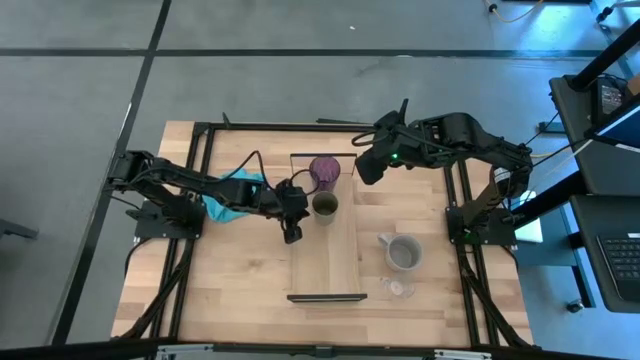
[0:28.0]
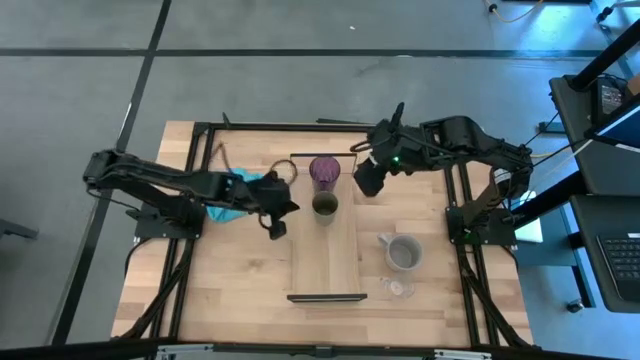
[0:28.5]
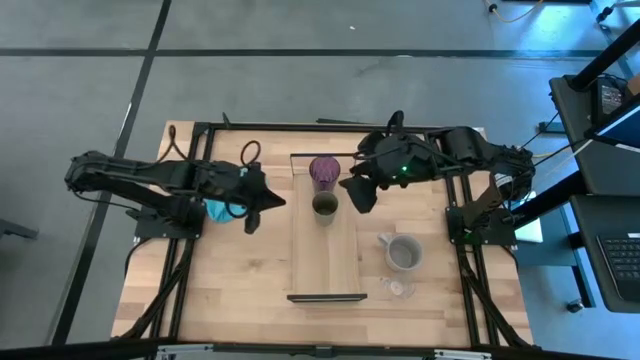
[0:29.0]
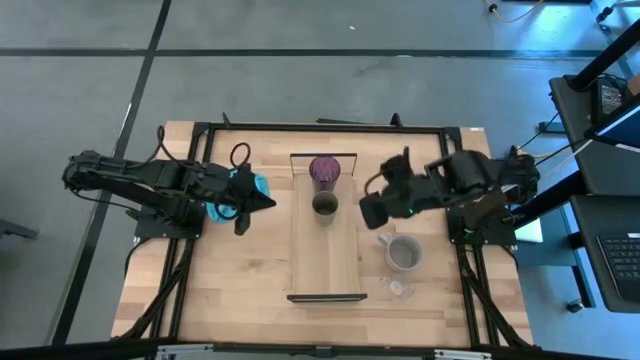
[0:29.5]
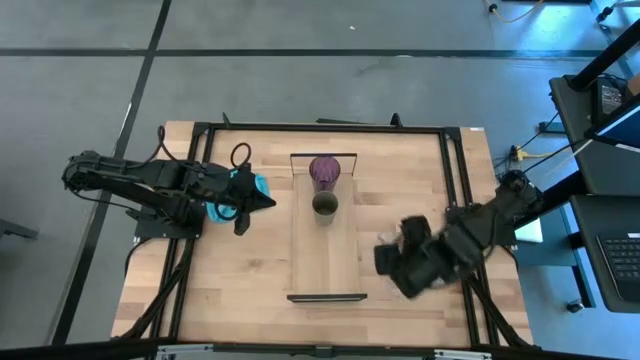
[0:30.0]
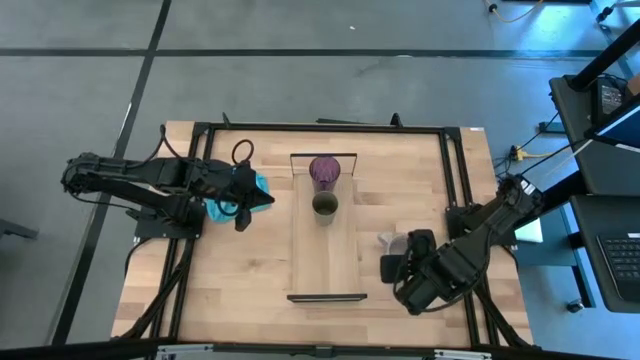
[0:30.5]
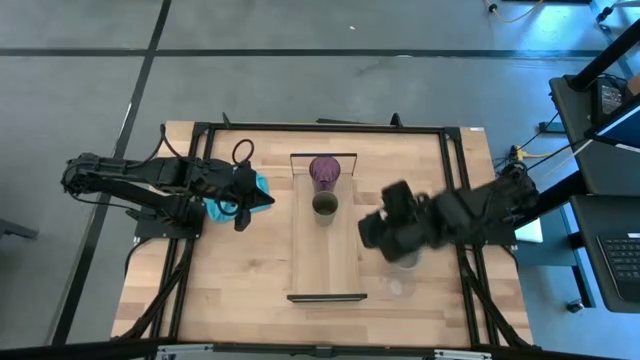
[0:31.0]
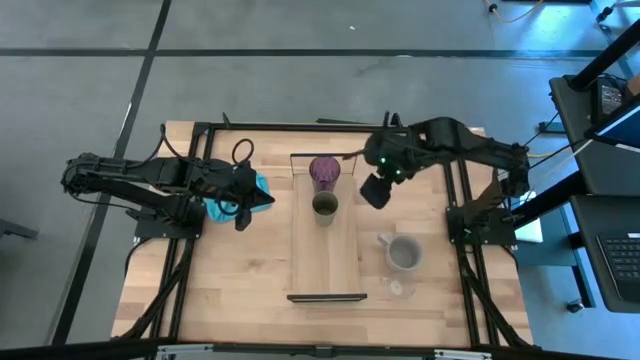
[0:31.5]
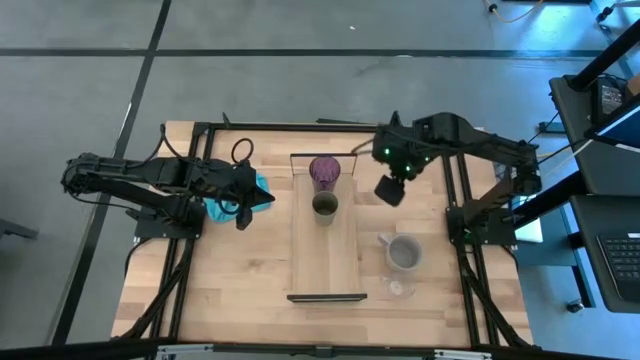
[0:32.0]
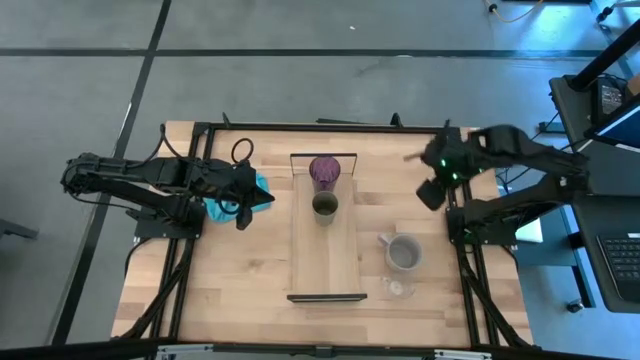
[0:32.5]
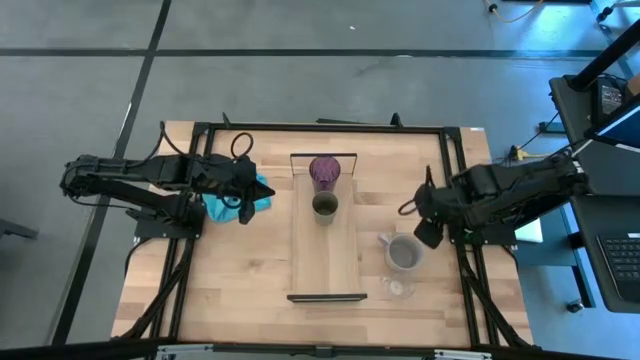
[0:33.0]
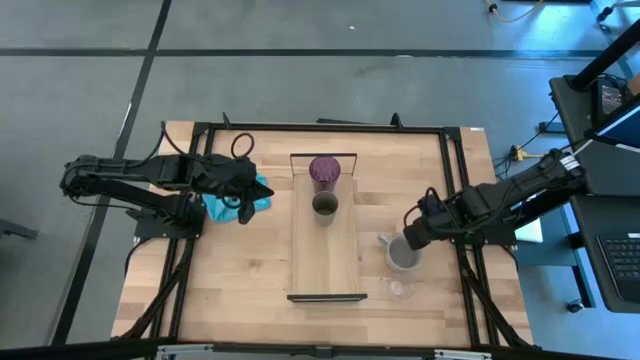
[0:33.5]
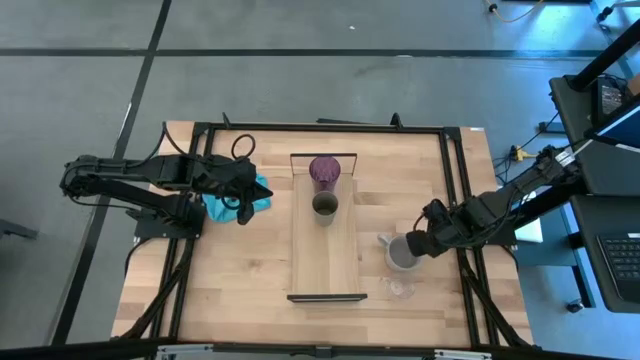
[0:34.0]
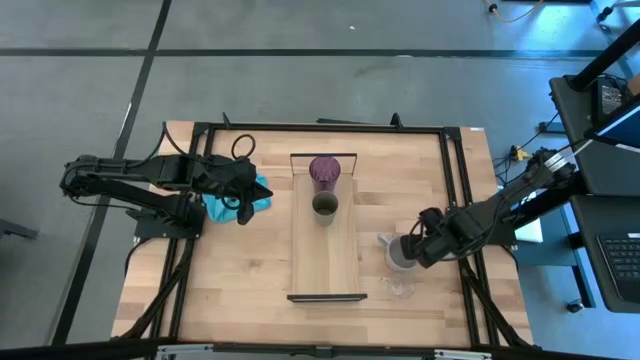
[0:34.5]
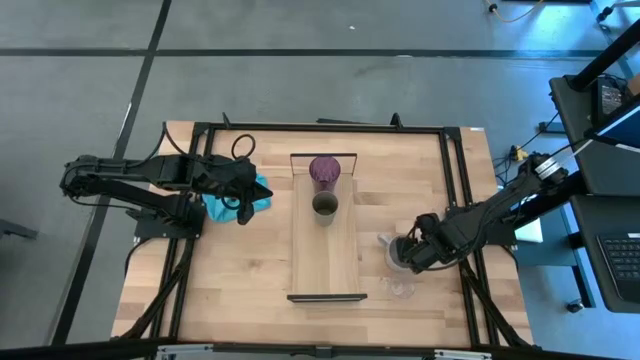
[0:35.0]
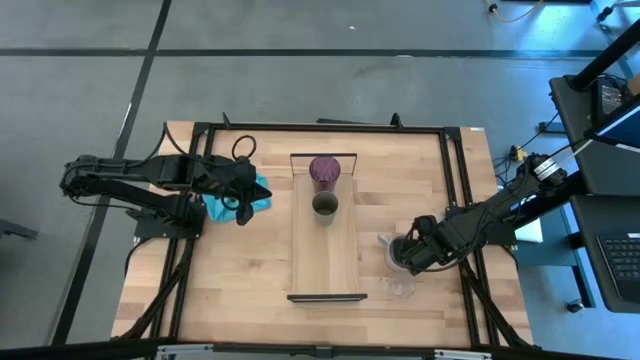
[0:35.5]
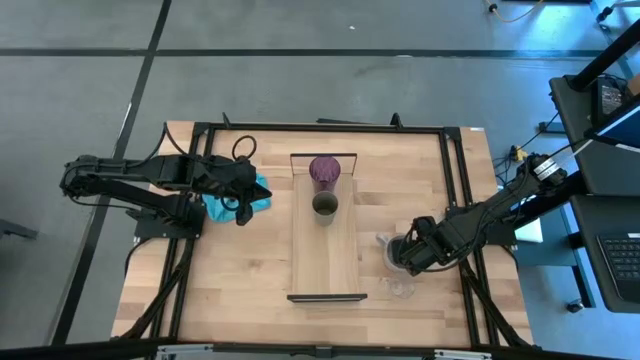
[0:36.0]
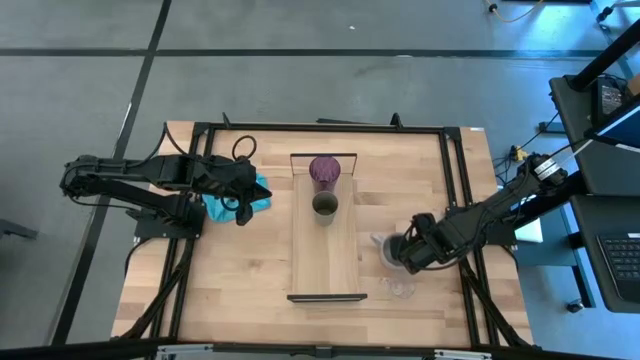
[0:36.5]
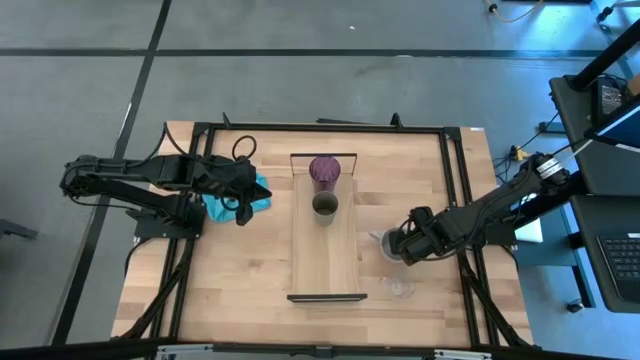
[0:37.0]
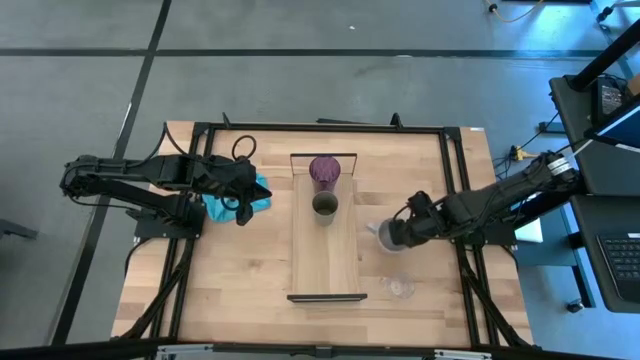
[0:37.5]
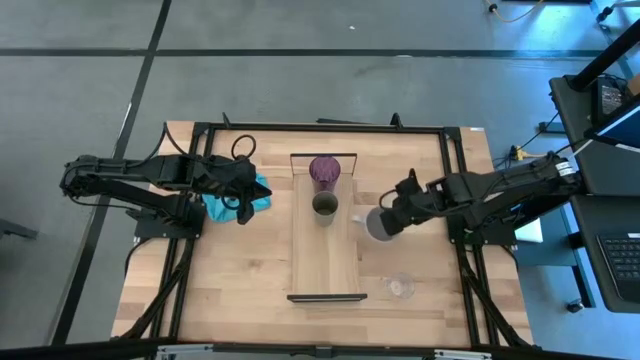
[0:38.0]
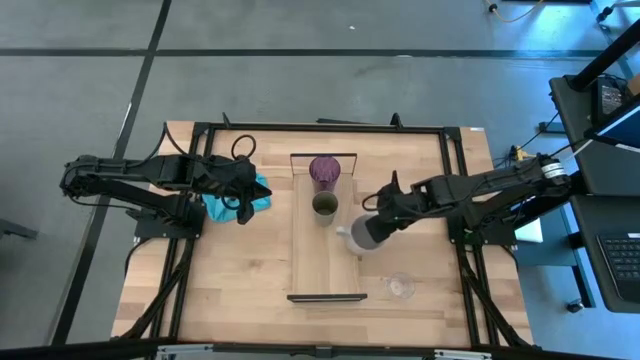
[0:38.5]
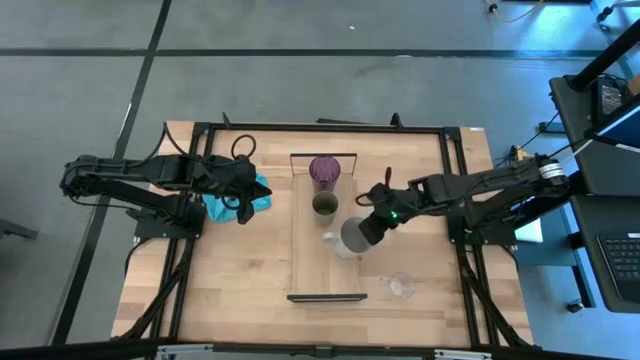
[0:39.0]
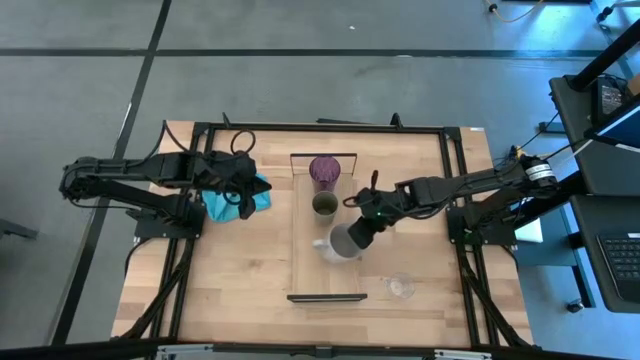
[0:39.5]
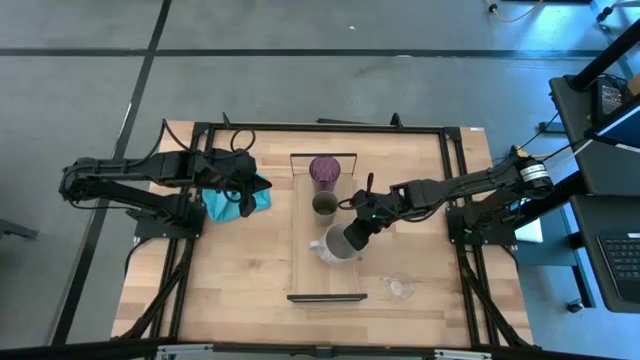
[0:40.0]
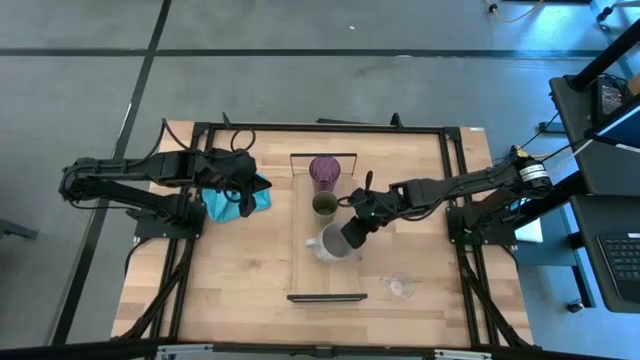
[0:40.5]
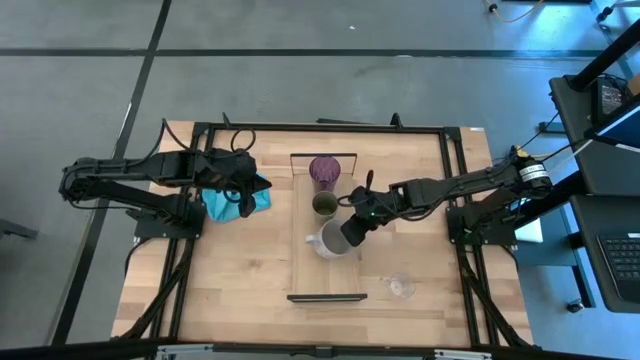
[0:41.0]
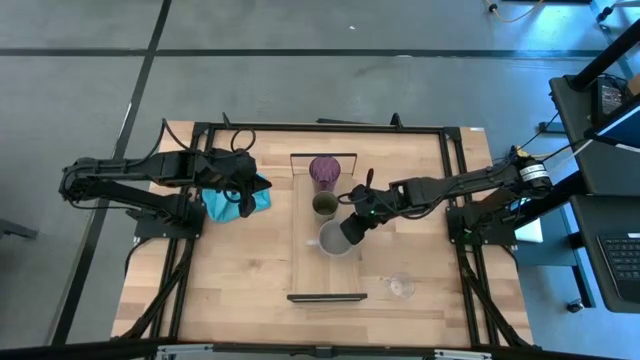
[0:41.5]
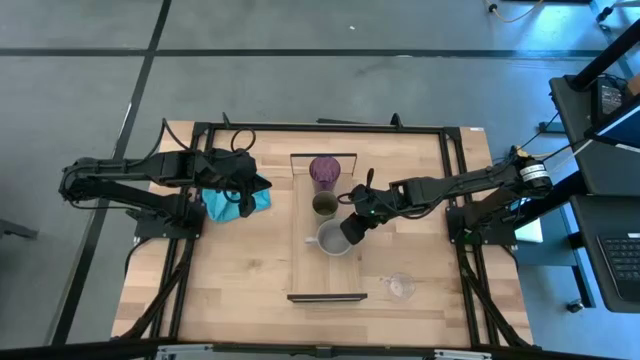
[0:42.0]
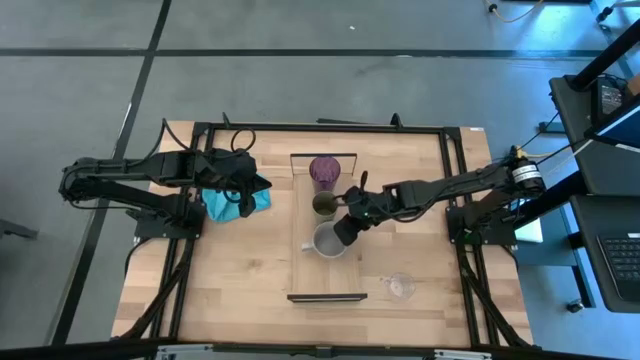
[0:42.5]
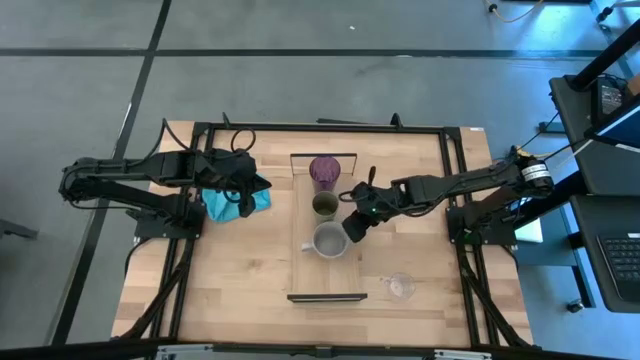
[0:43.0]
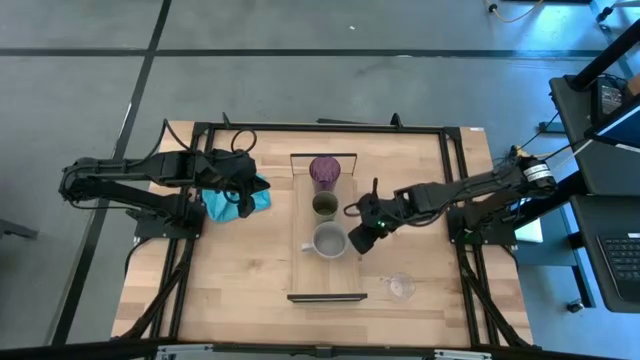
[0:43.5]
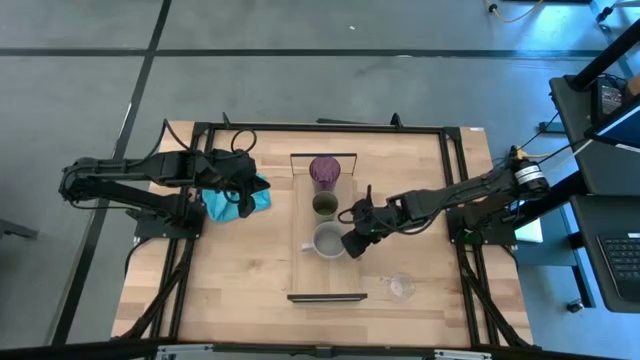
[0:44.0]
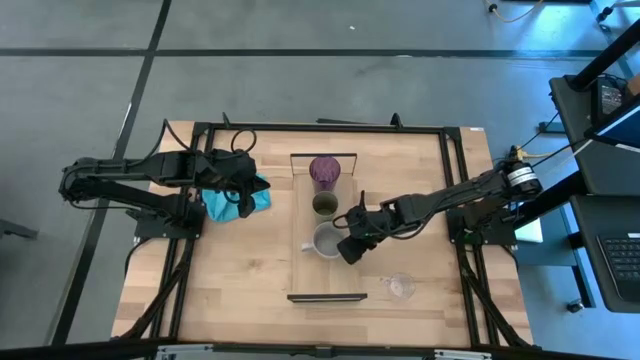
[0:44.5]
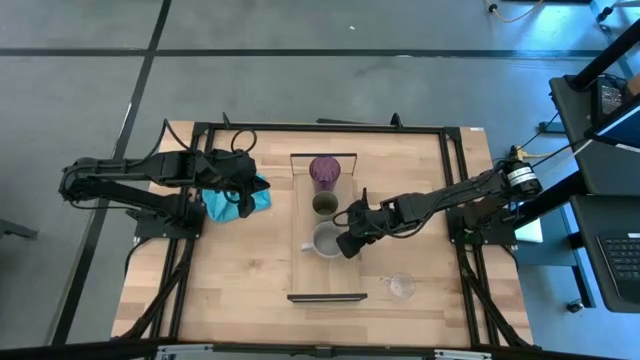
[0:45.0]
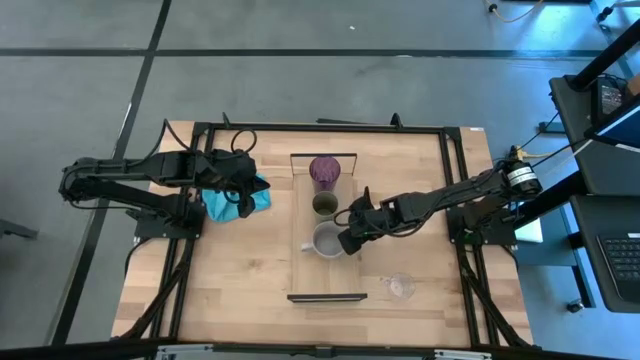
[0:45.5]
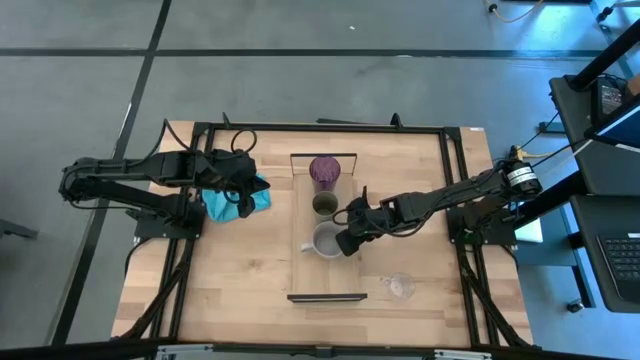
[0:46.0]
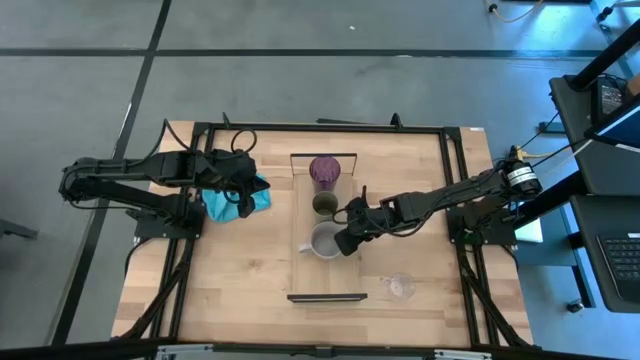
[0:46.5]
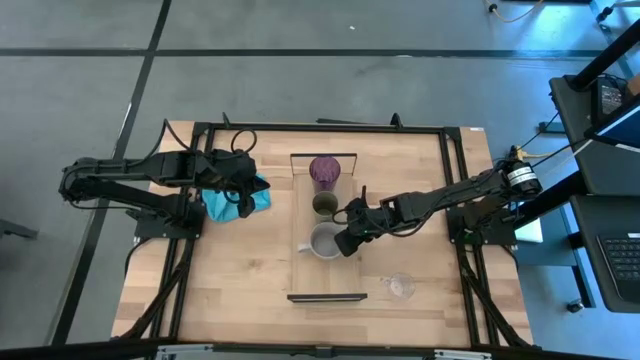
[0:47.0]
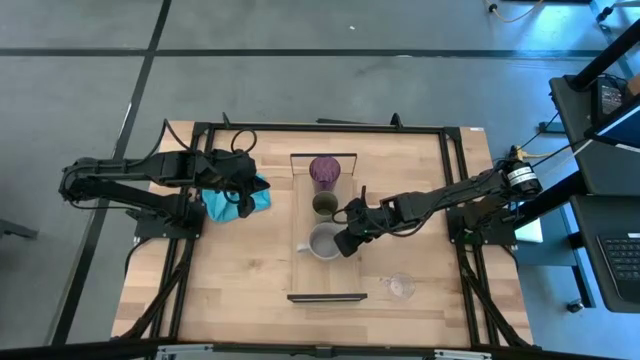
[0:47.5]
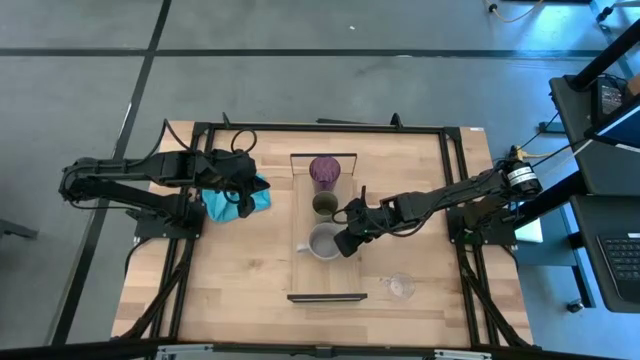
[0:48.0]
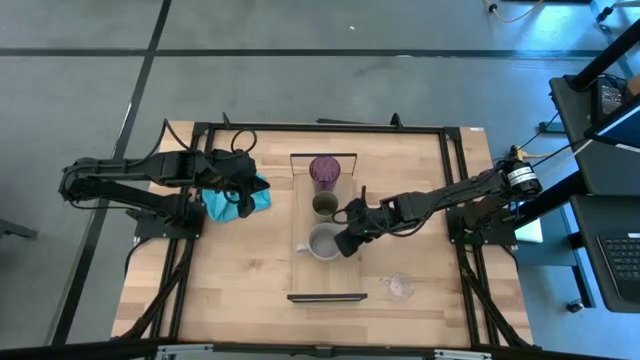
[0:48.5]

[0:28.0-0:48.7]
Task: Stack small to large cups/mugs on shelf
Put the light gray mug on the shelf
